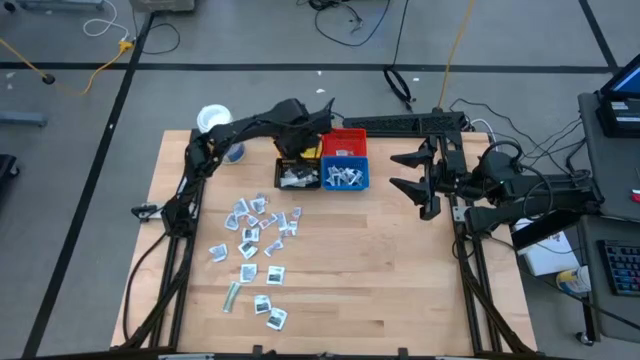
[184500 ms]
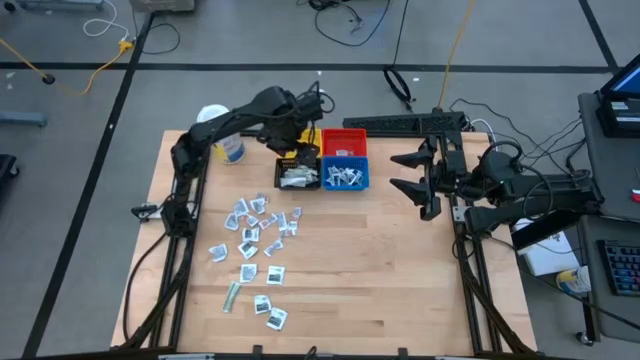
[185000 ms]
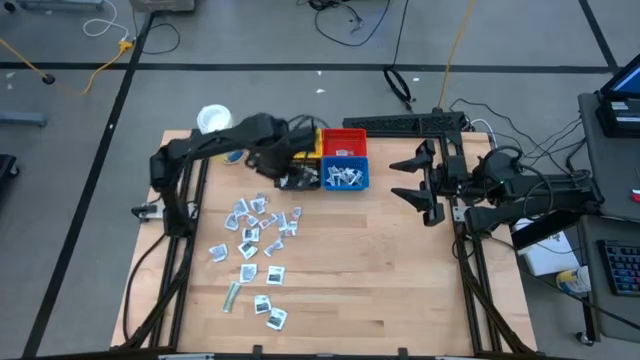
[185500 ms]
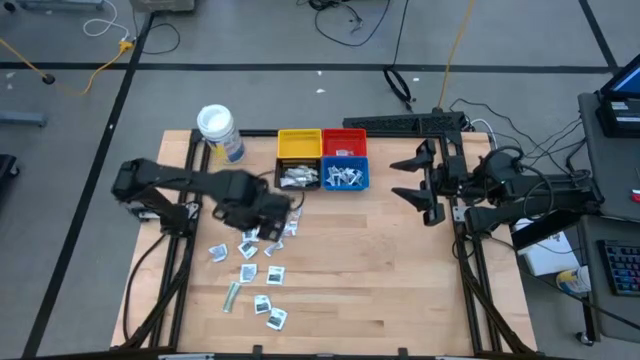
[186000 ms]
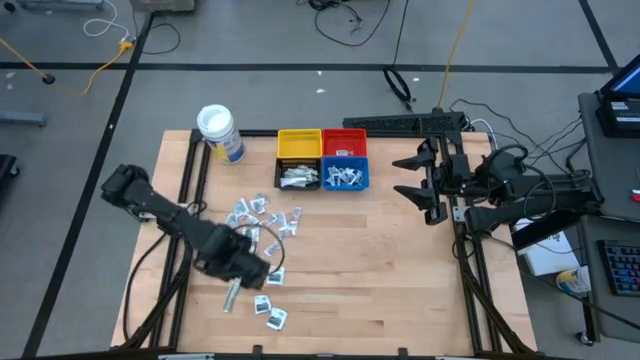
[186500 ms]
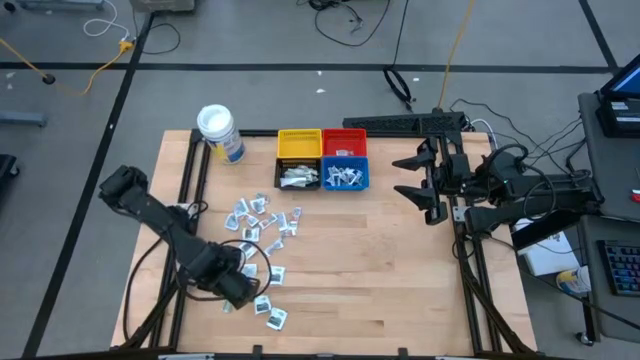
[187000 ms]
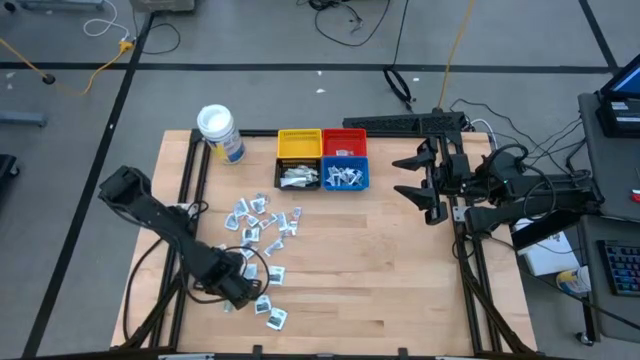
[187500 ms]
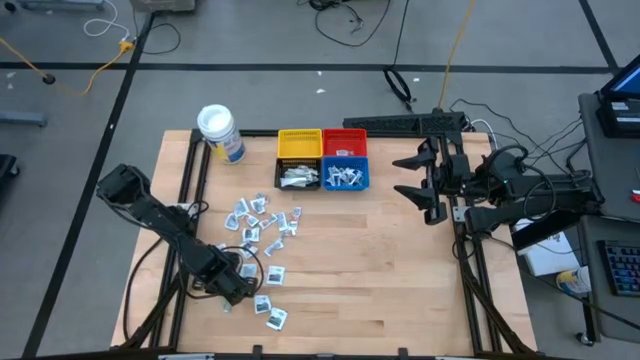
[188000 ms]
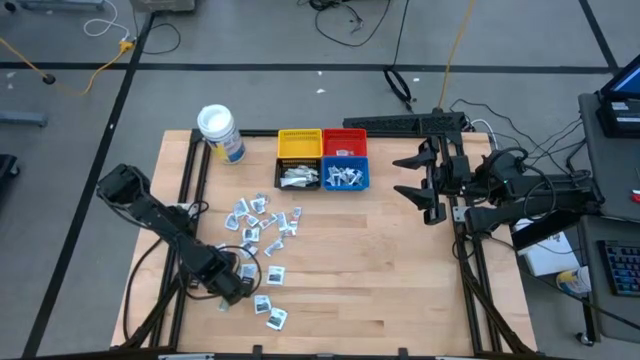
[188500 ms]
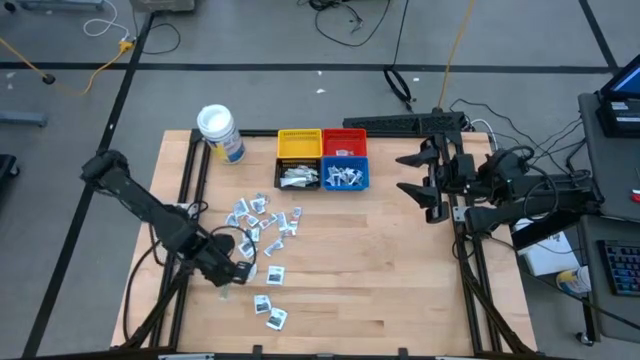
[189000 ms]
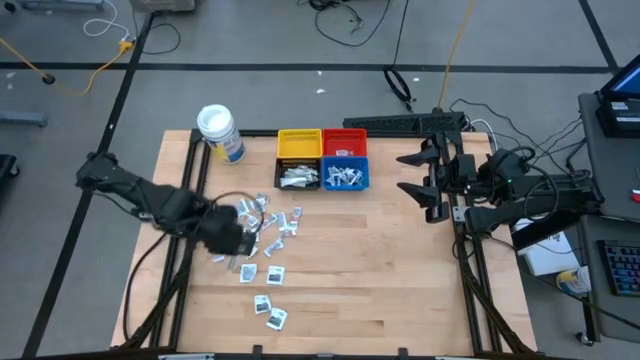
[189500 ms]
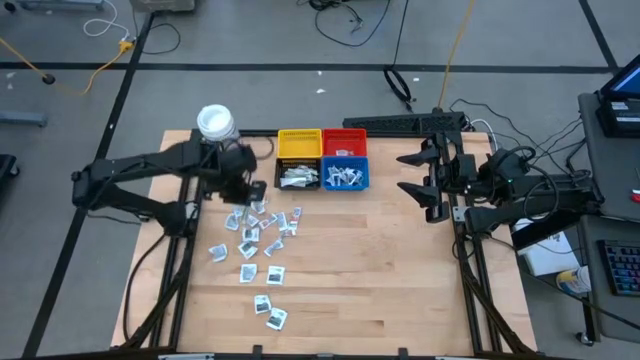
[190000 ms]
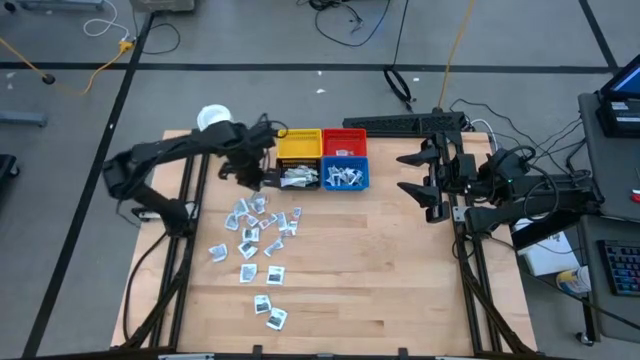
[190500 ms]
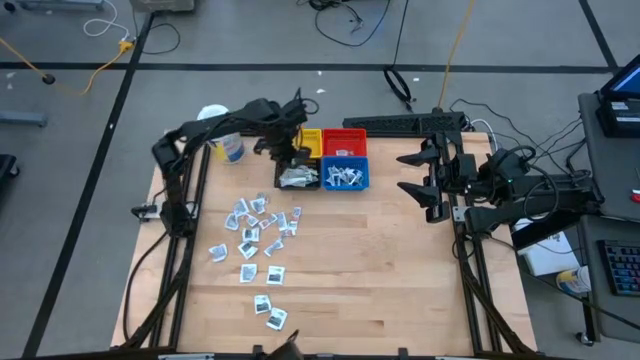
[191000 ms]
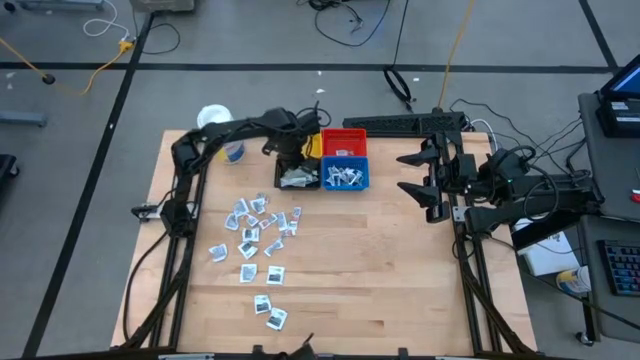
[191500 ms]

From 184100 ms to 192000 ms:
Task: Pick & Place First Aid Supplies
Put the green bandage pack into the black basket

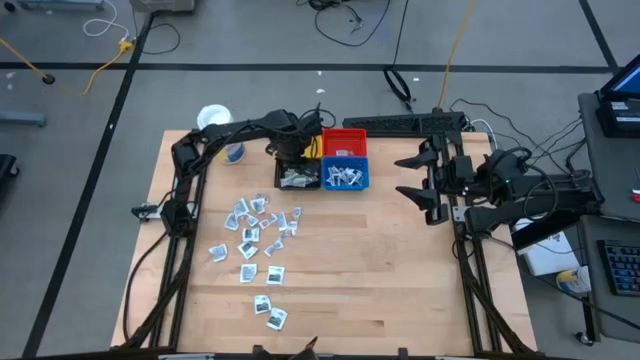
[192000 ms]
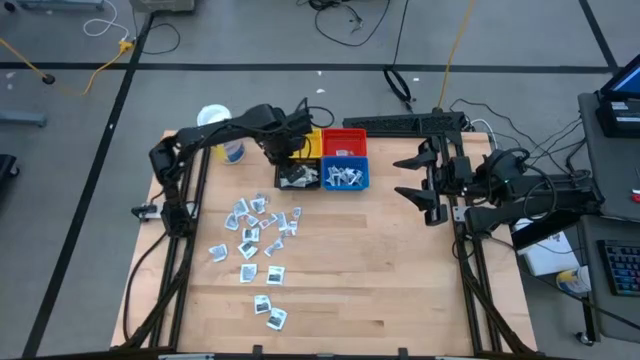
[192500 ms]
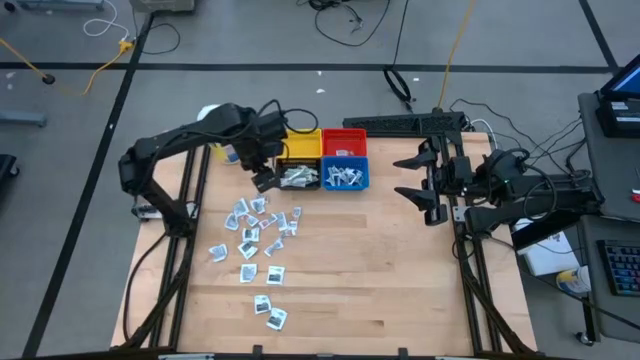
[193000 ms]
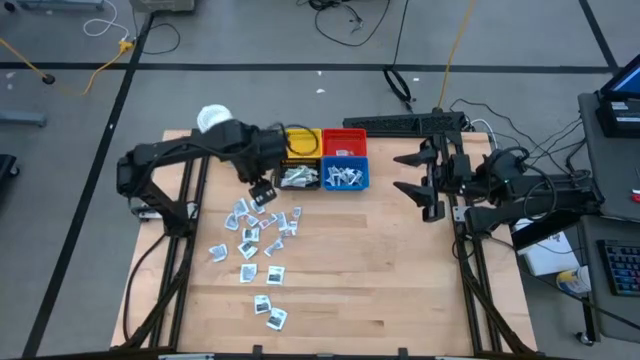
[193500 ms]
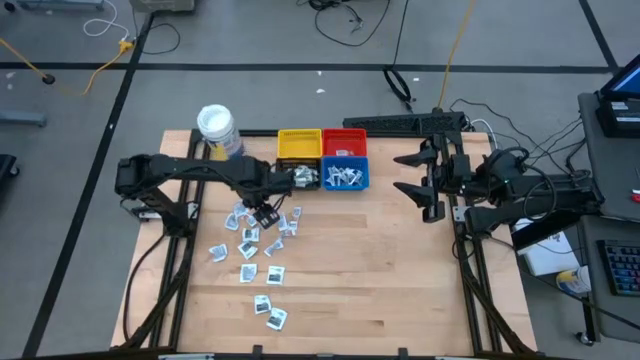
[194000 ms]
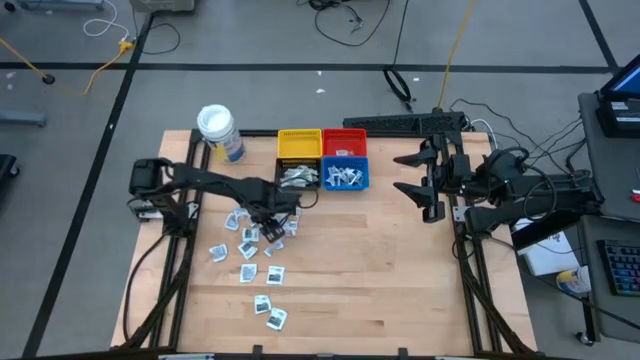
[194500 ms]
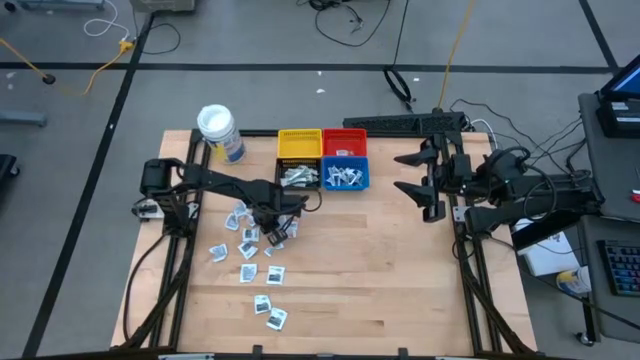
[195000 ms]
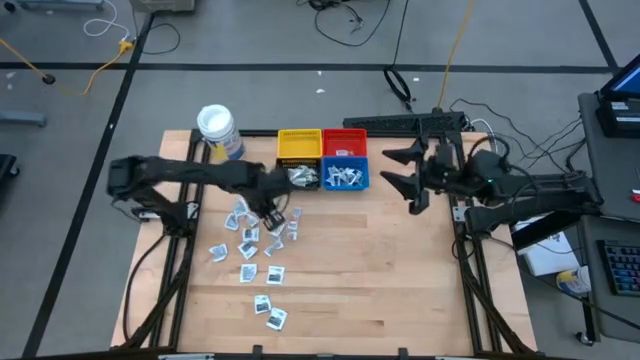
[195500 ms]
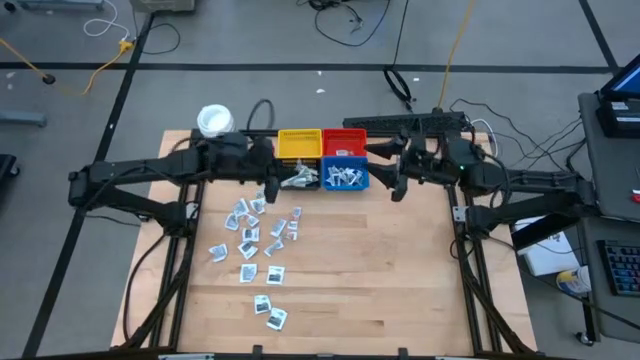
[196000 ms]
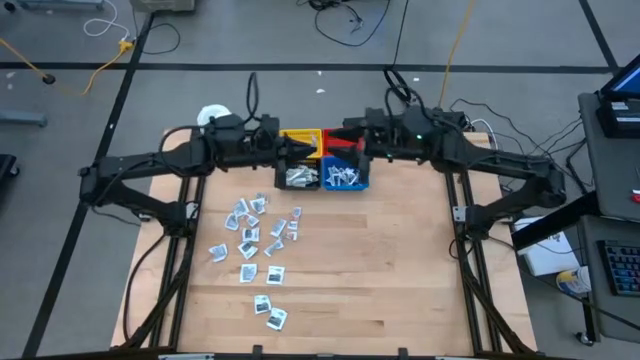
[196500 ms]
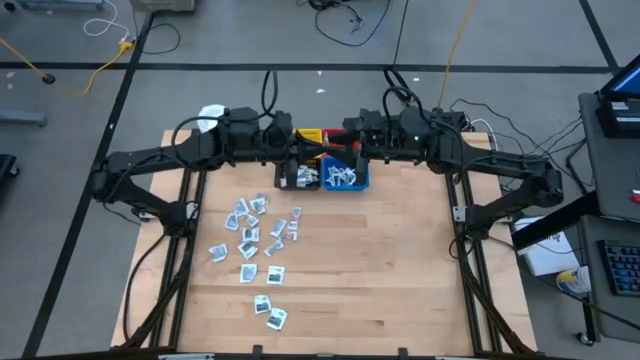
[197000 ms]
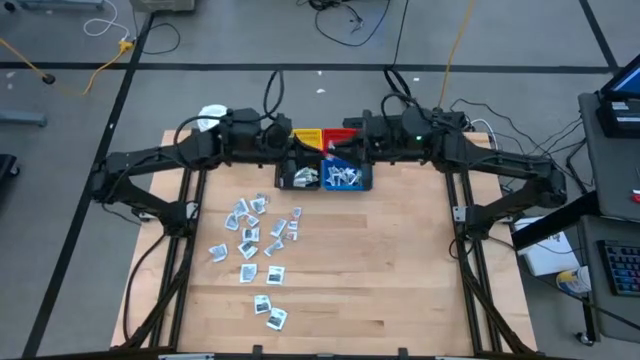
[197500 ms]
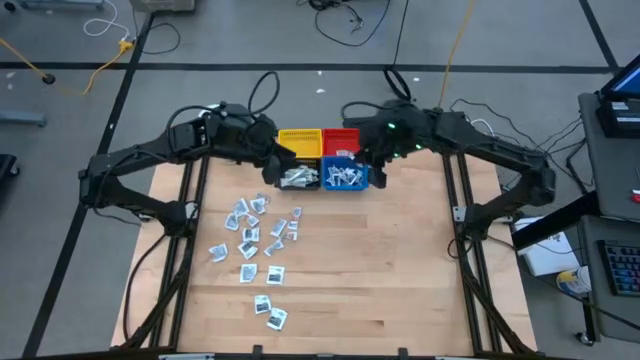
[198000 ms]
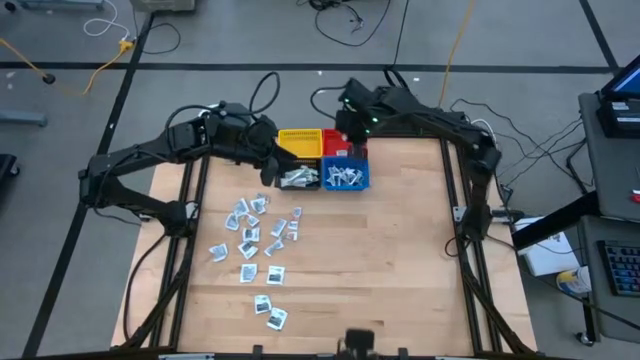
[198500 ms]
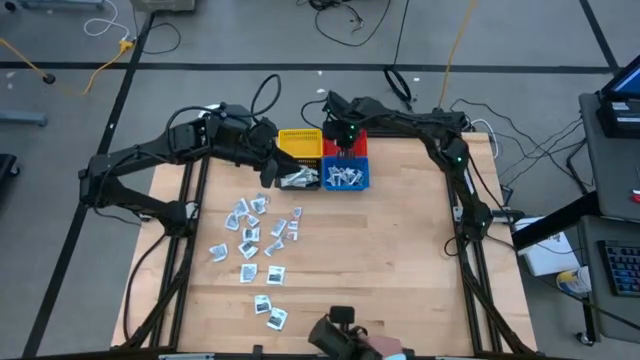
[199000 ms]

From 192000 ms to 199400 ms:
Put the orange ointment pack into the red basket

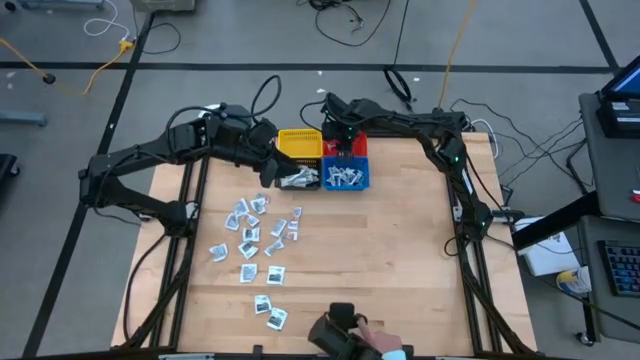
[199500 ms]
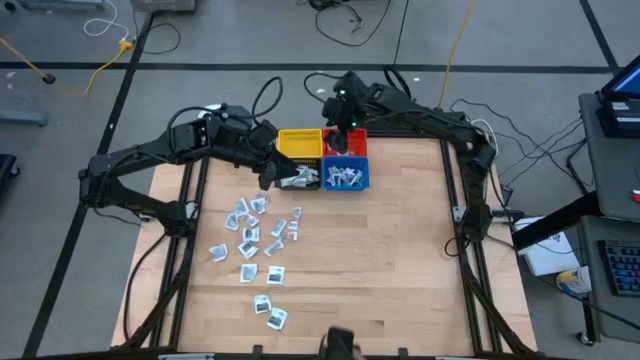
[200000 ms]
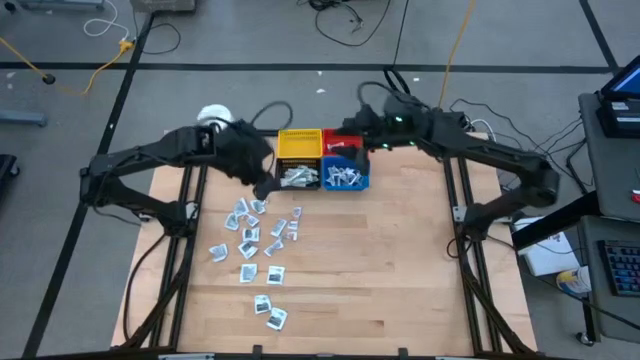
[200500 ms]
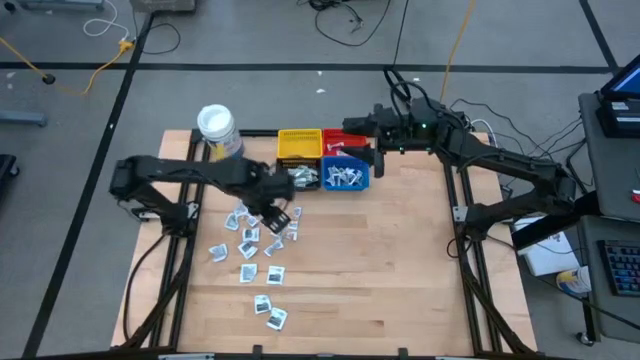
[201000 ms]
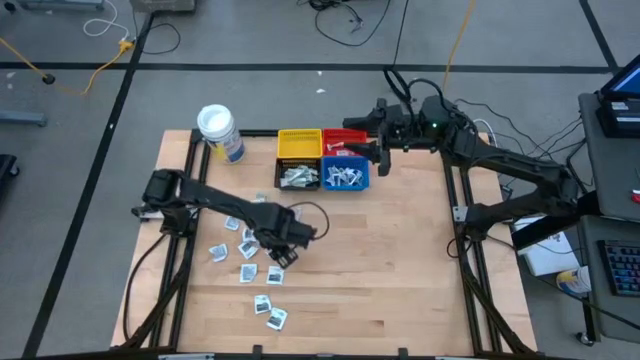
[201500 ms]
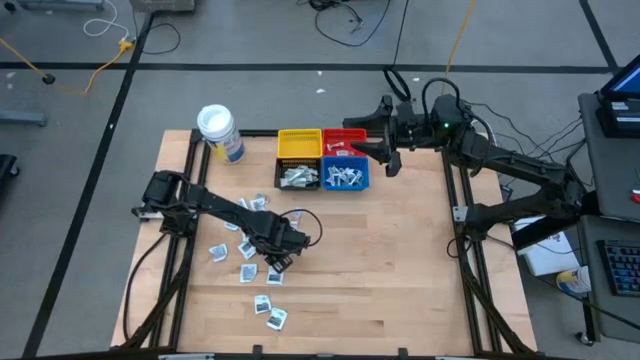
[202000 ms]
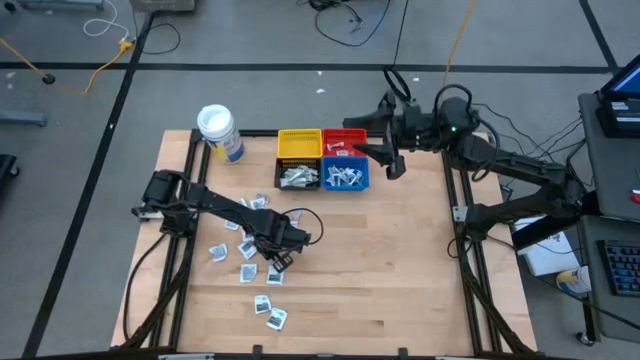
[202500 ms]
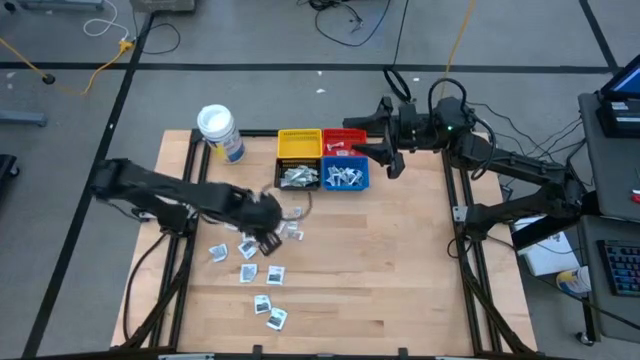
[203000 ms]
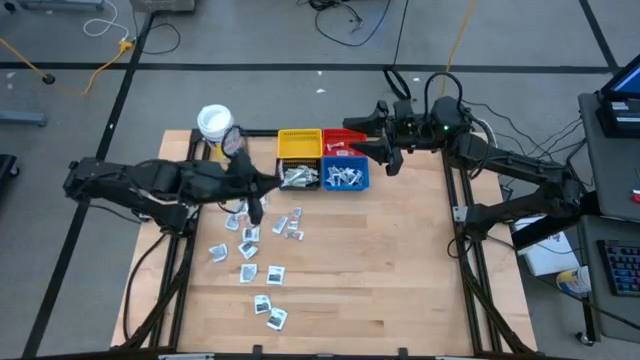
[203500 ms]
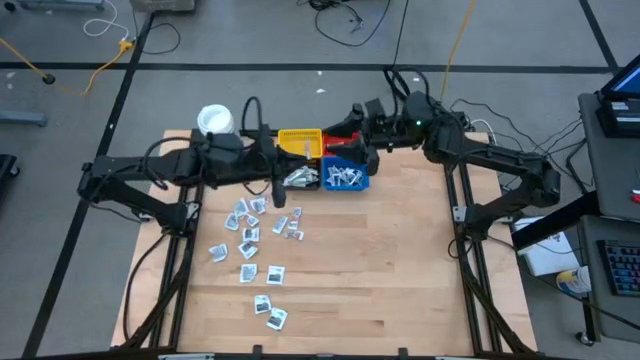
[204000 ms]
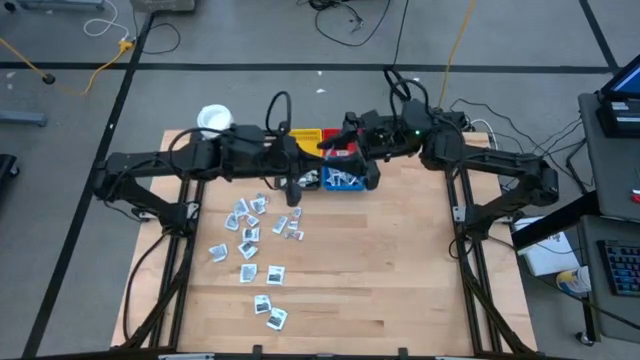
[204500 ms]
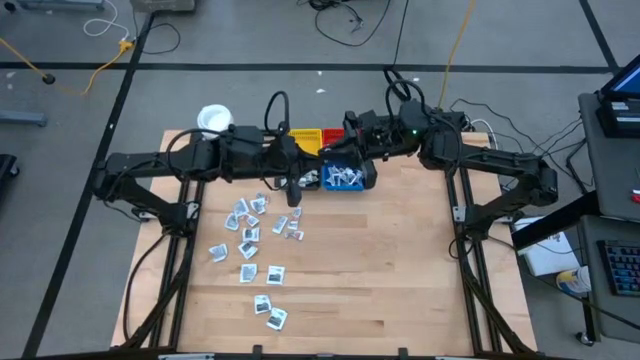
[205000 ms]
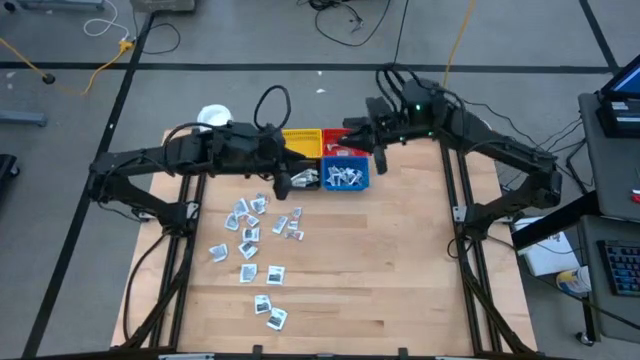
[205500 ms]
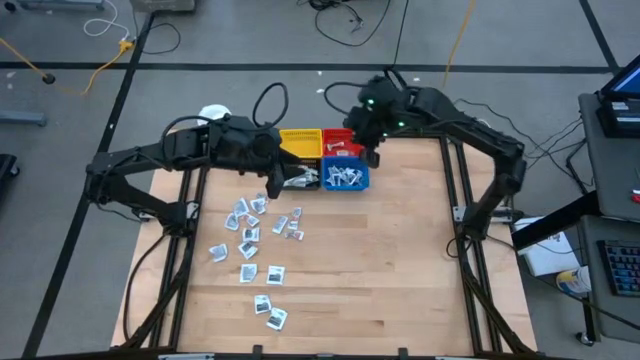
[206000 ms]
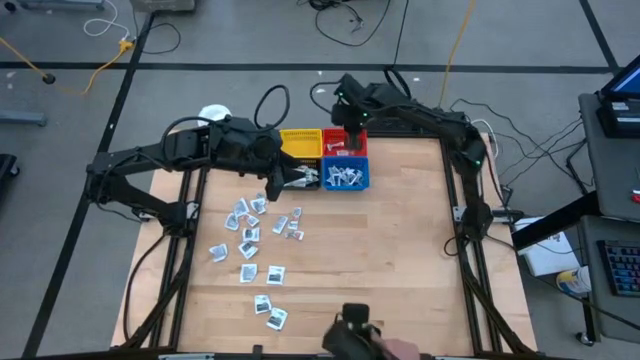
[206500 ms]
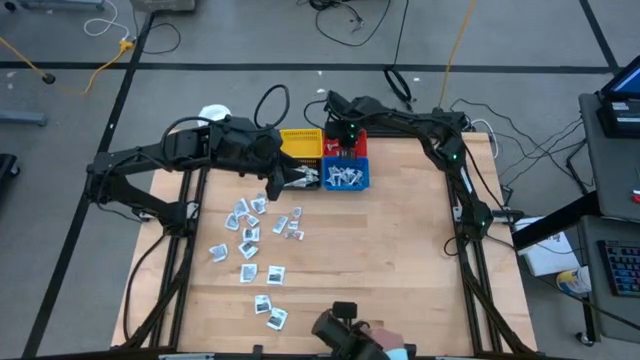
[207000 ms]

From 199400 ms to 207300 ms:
Put the orange ointment pack into the red basket
